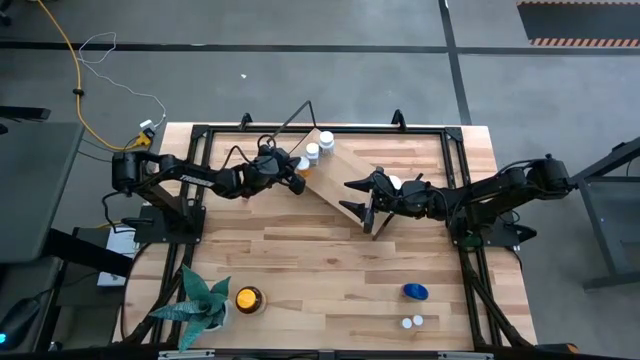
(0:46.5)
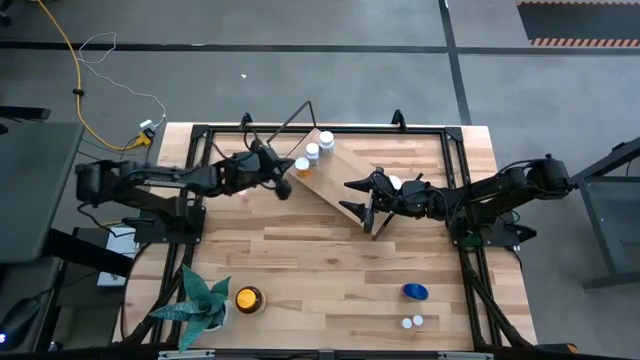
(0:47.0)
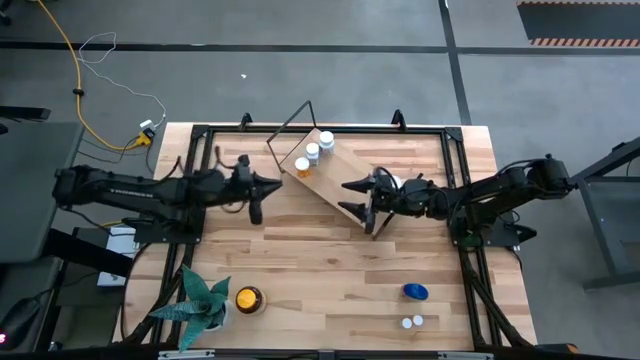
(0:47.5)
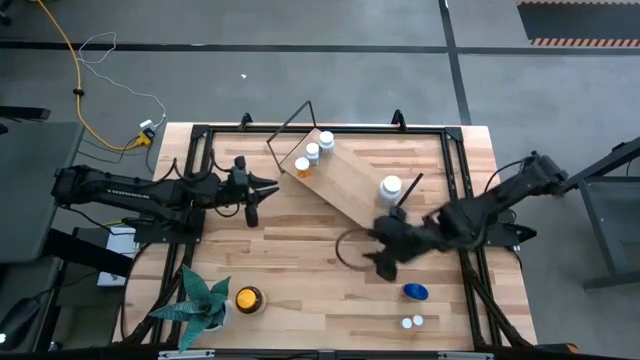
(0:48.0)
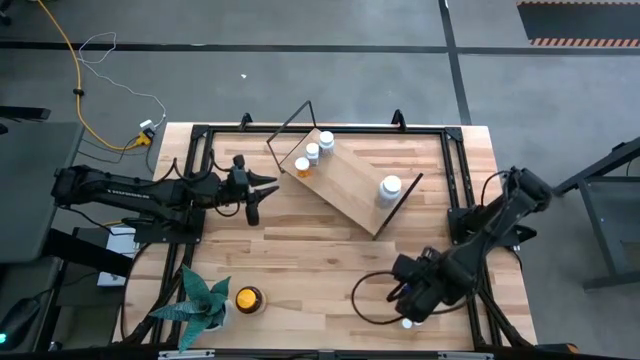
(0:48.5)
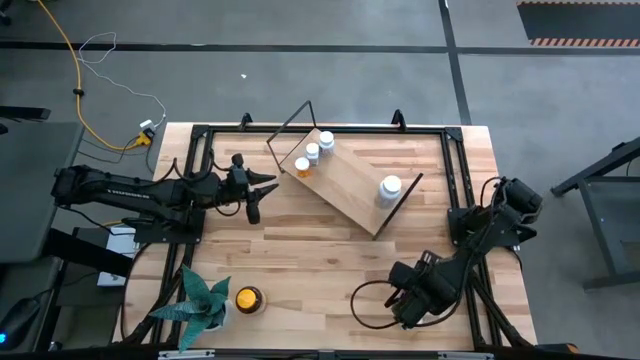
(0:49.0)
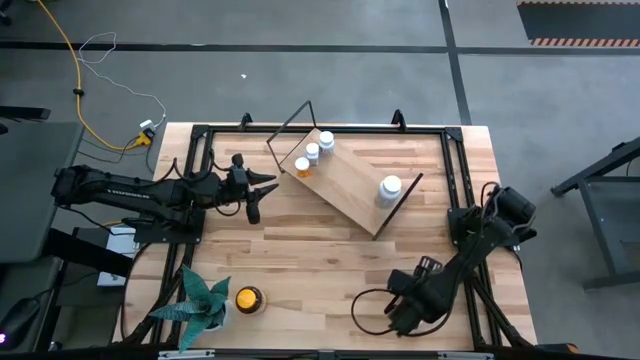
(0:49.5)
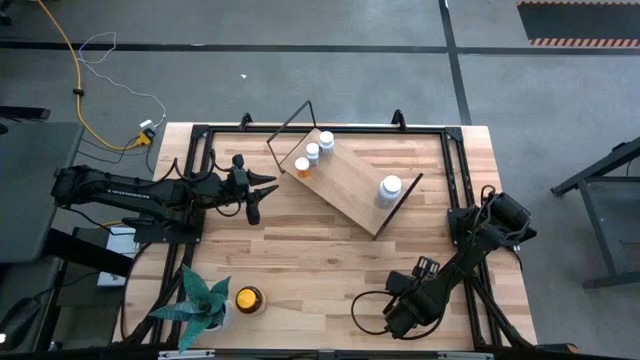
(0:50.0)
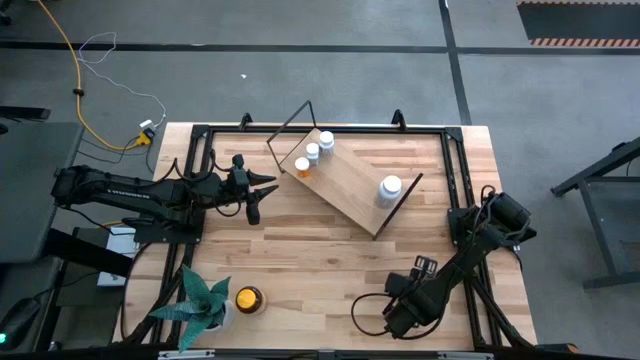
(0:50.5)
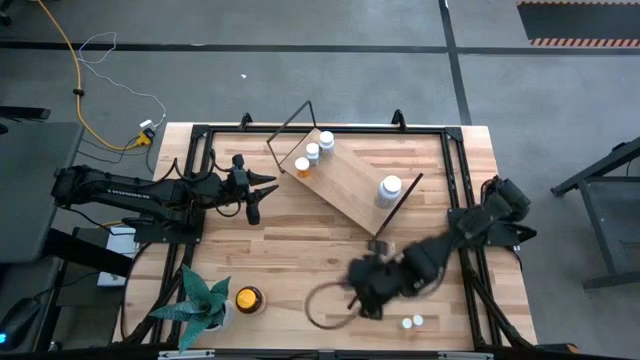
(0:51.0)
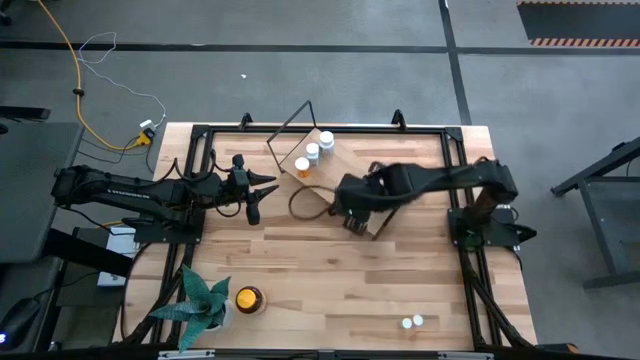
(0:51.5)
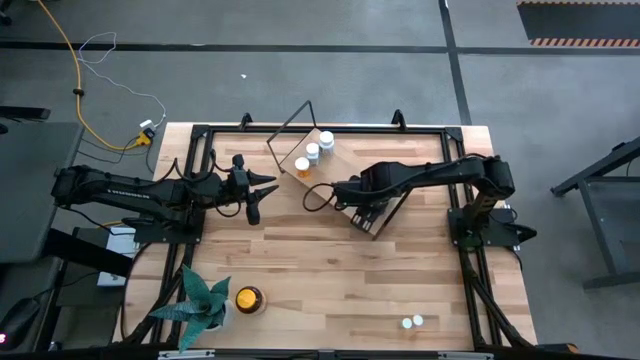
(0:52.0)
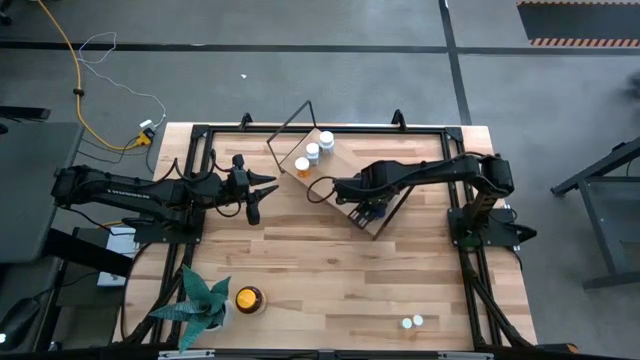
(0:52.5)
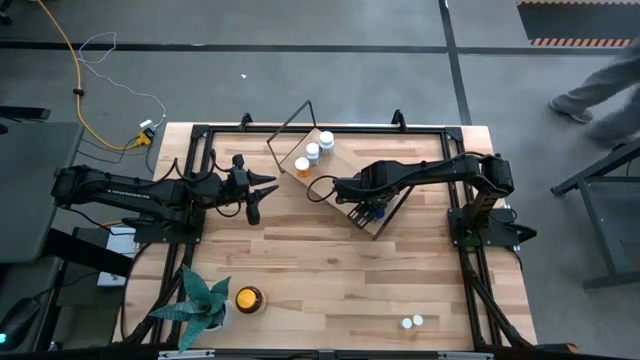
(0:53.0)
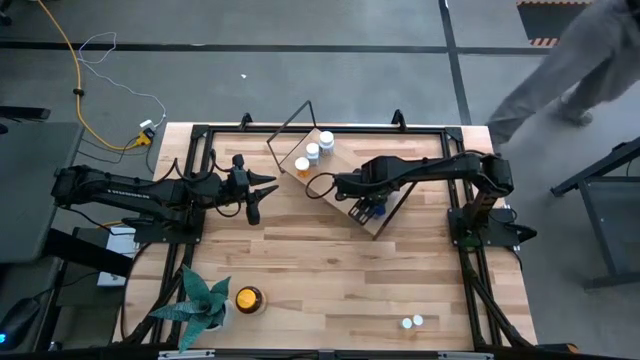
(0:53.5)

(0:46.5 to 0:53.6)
Task: Pick and place medicine bottles onto shelf by color
Put the blue pill bottle on the shelf

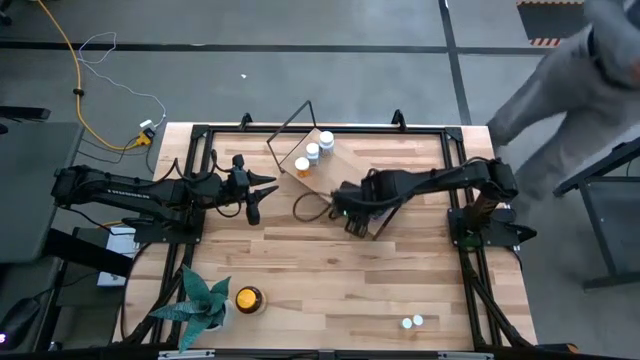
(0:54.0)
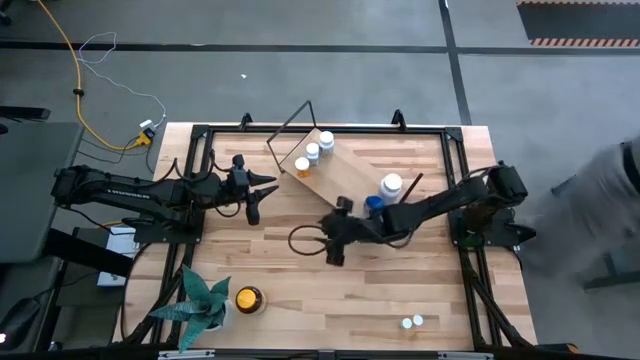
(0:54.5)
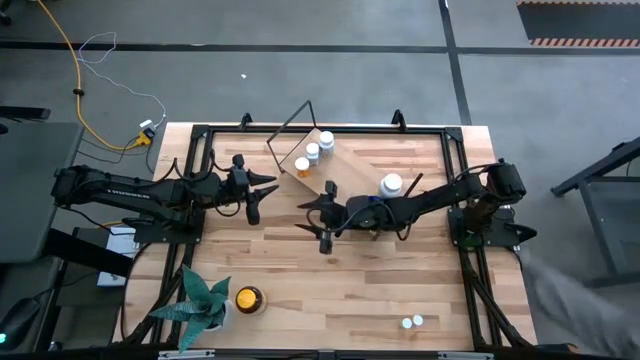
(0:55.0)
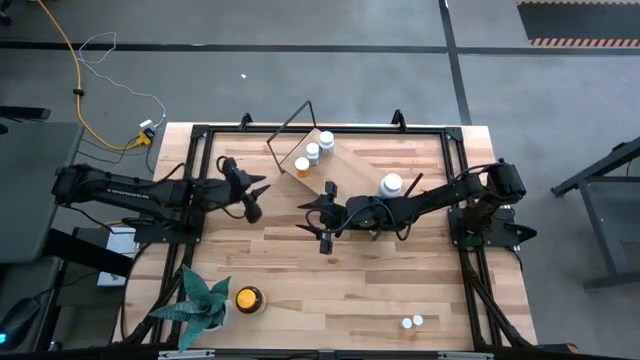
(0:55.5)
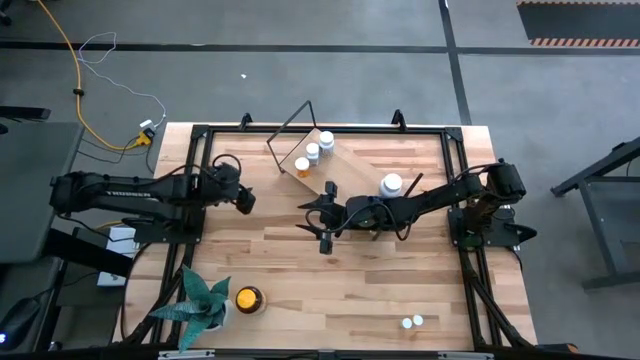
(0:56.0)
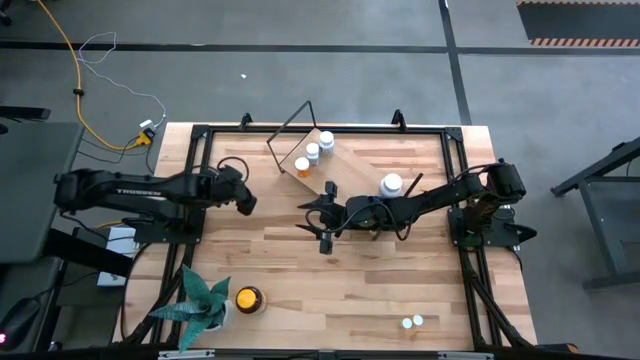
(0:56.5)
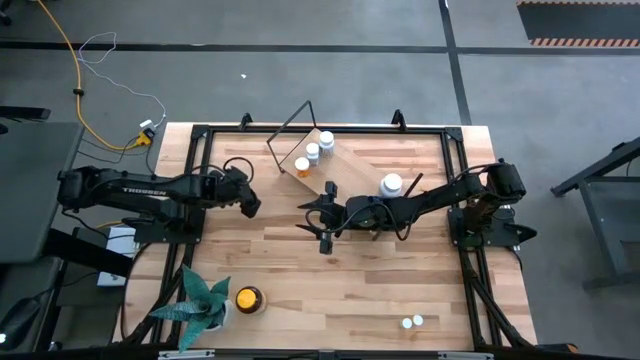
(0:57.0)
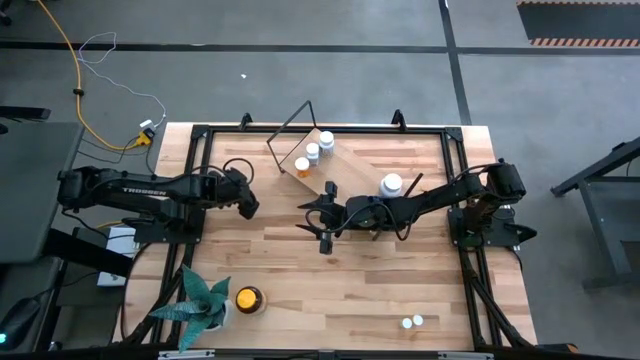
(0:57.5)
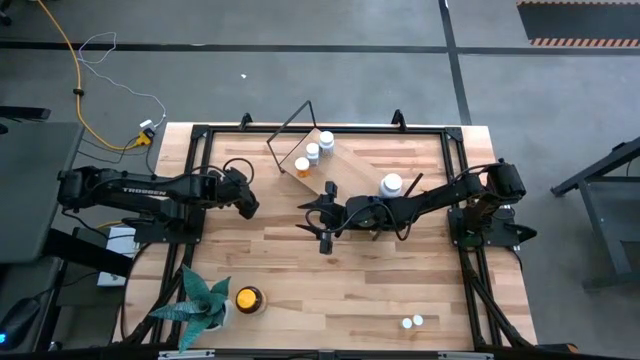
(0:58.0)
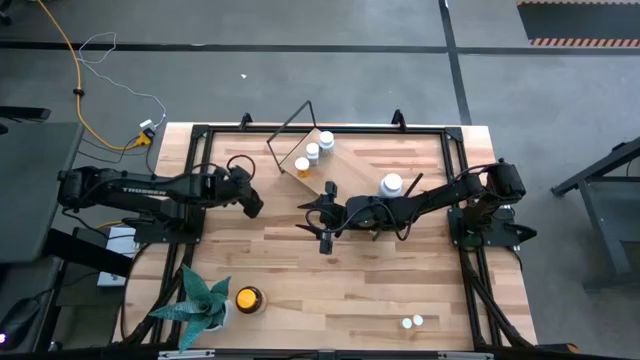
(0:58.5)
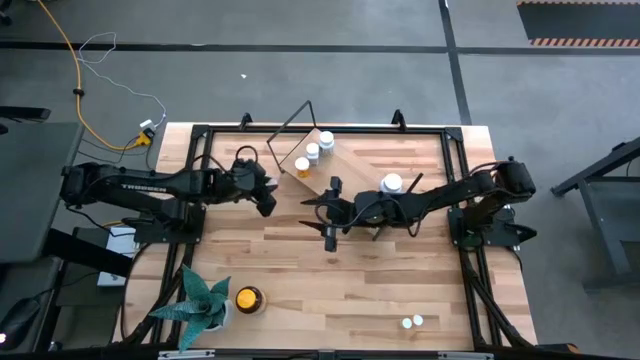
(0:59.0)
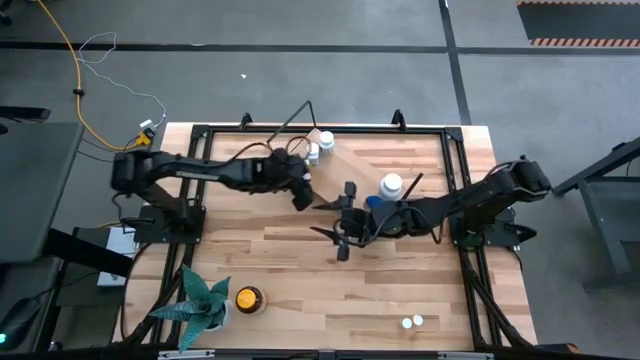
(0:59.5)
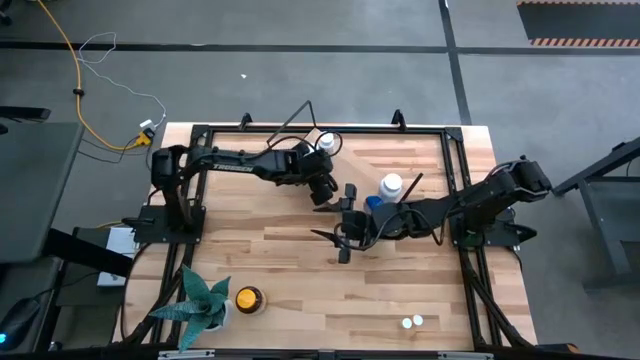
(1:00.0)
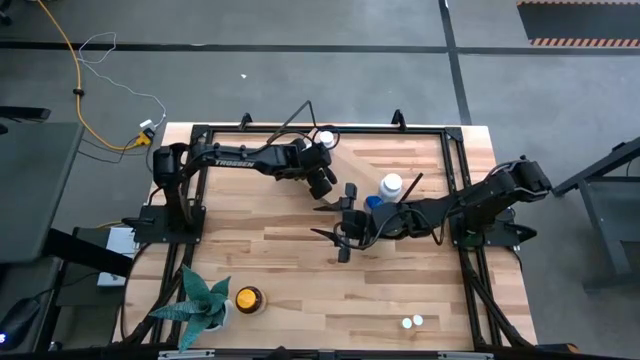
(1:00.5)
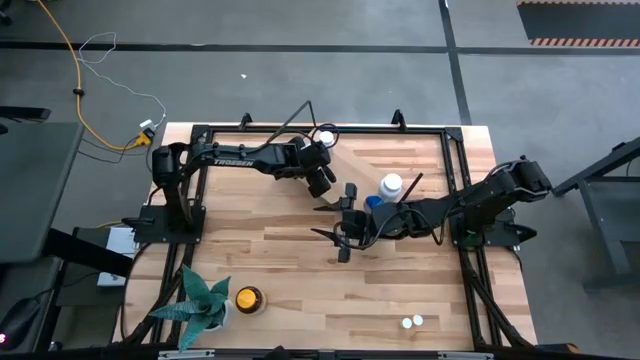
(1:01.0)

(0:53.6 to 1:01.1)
Put the pink pill bottle on the shelf

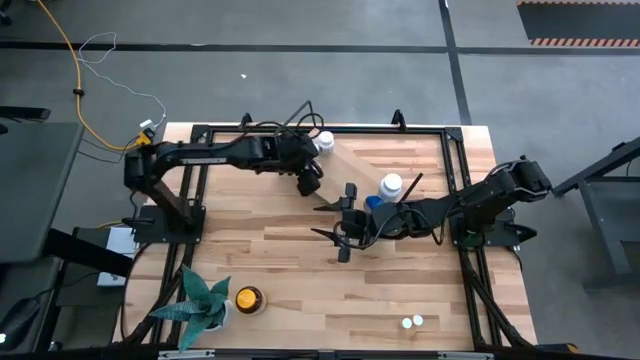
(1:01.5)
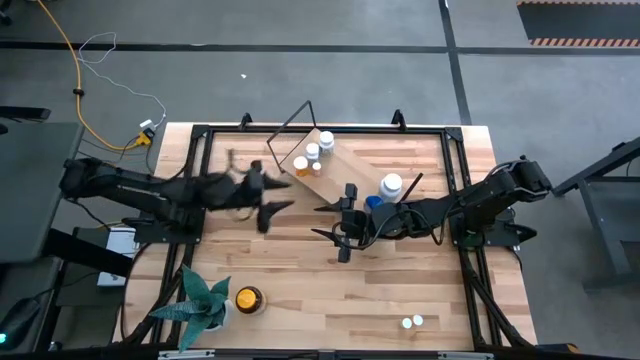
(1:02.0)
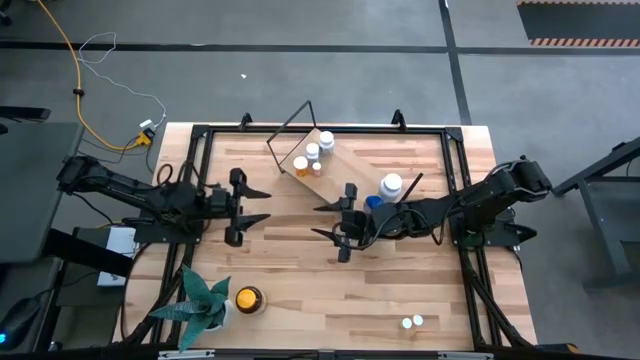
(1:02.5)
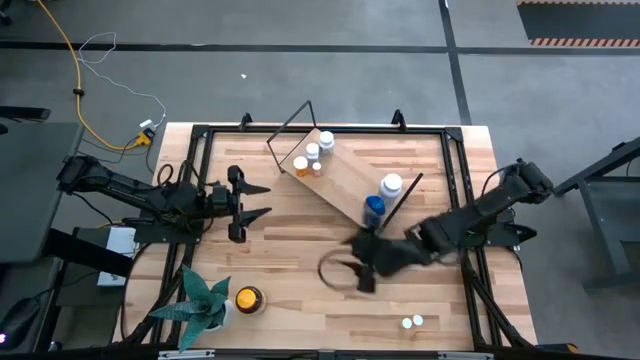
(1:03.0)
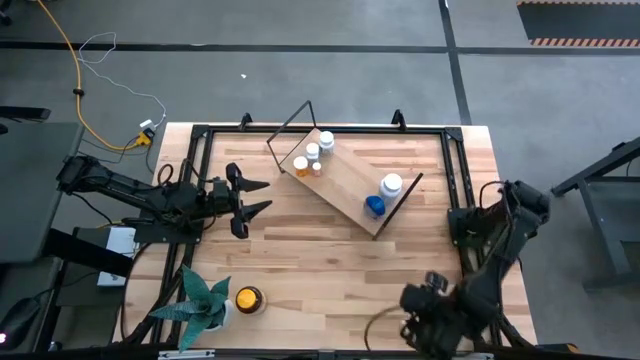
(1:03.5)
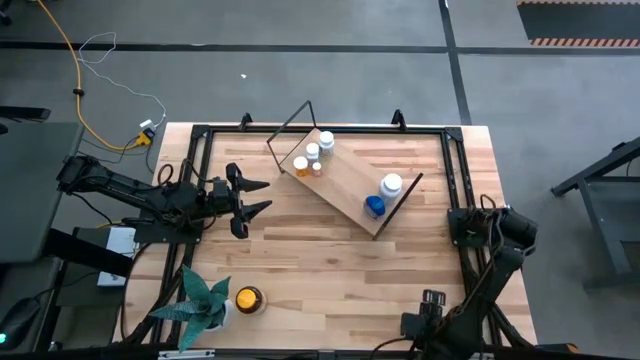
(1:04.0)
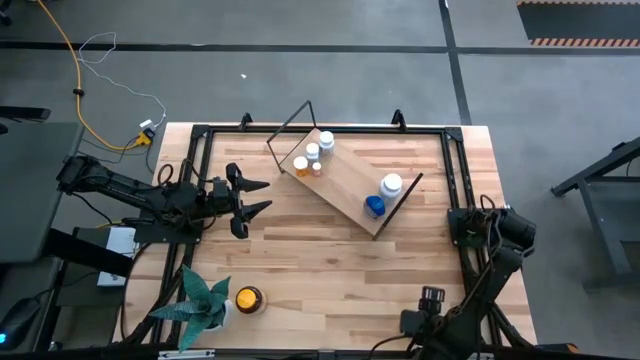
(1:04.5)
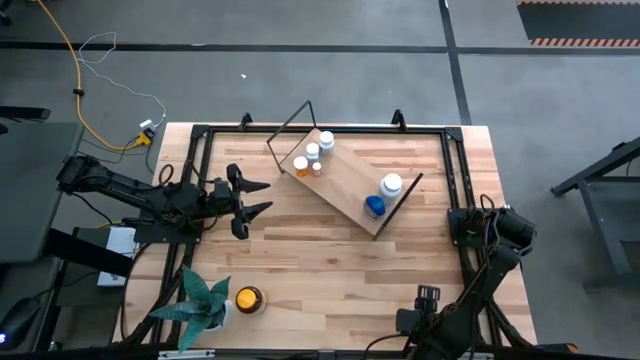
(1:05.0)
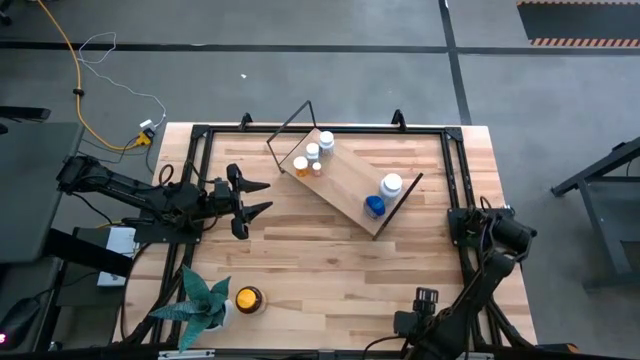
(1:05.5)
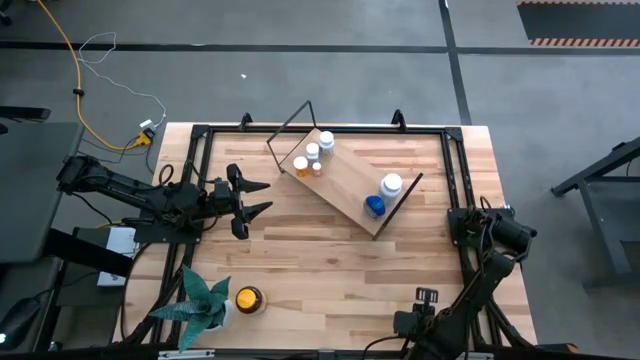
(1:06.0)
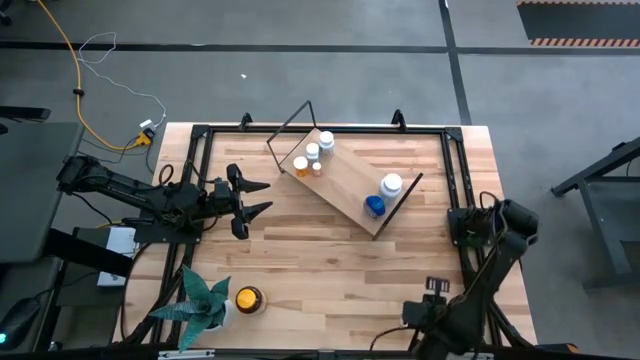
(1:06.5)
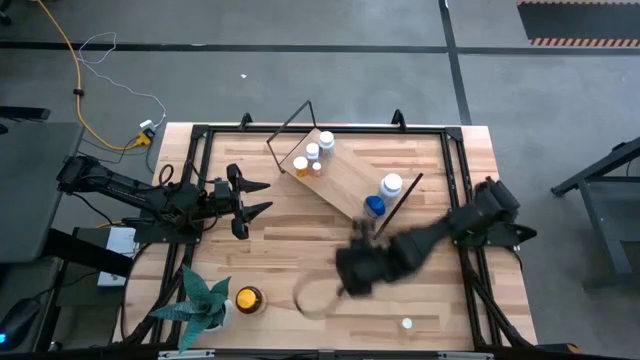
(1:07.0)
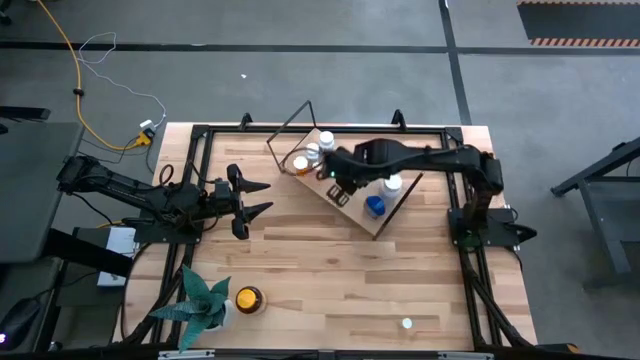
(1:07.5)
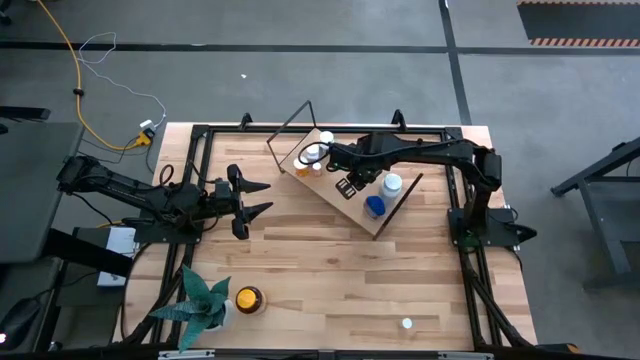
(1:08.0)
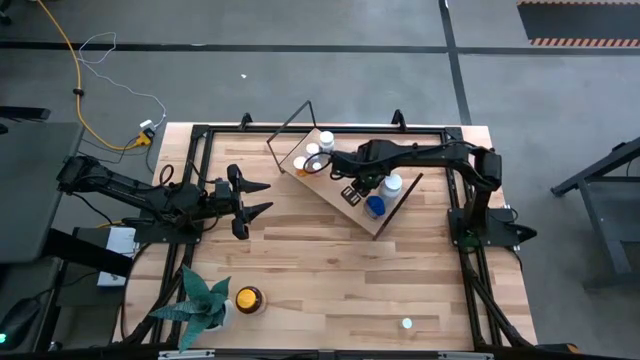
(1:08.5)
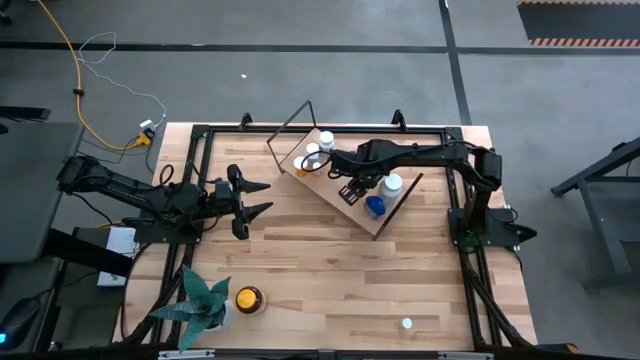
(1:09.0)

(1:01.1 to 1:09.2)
Put the orange pill bottle on the shelf
